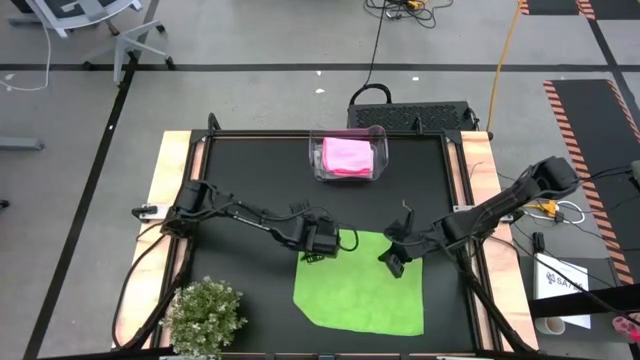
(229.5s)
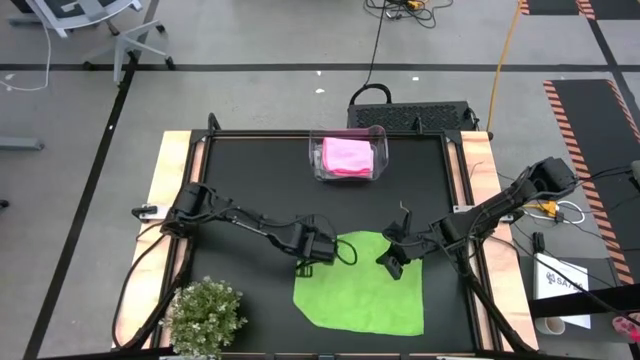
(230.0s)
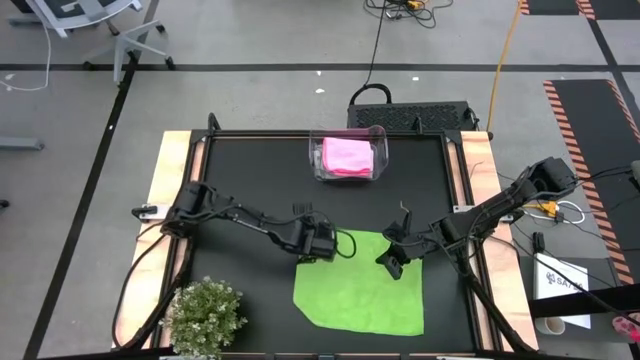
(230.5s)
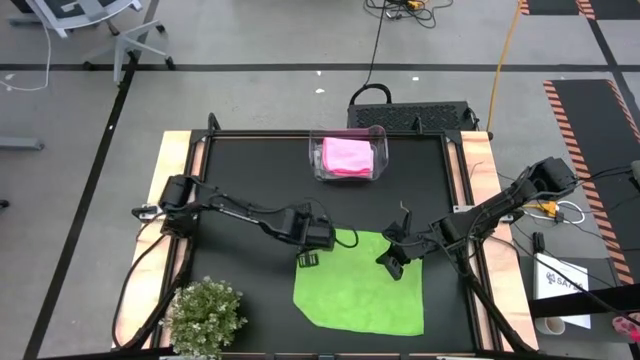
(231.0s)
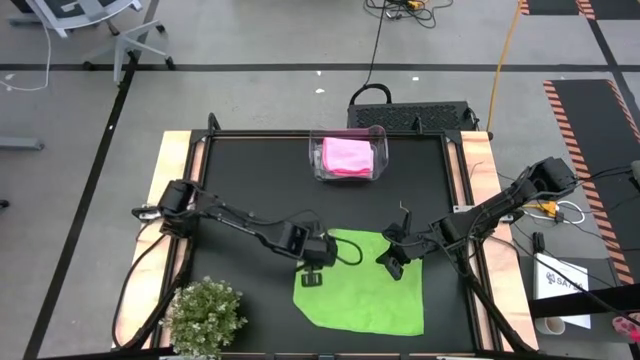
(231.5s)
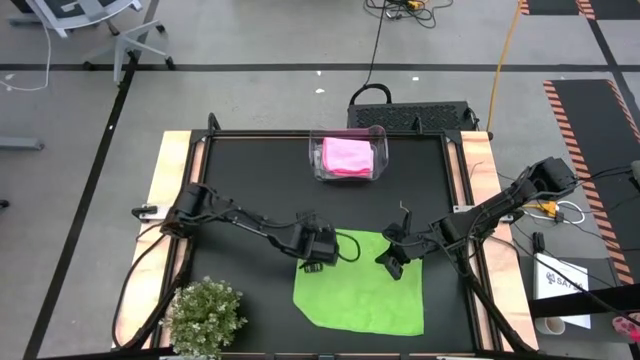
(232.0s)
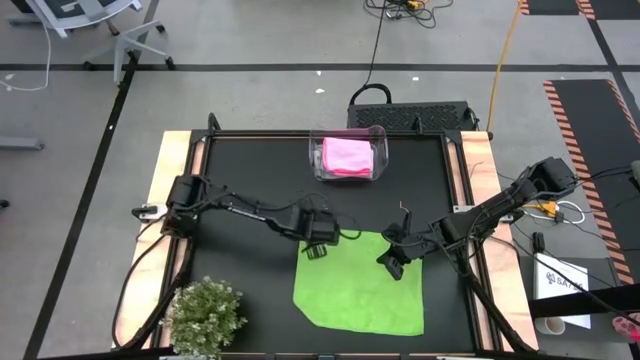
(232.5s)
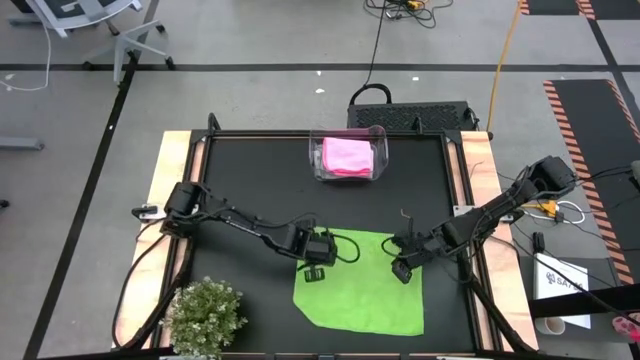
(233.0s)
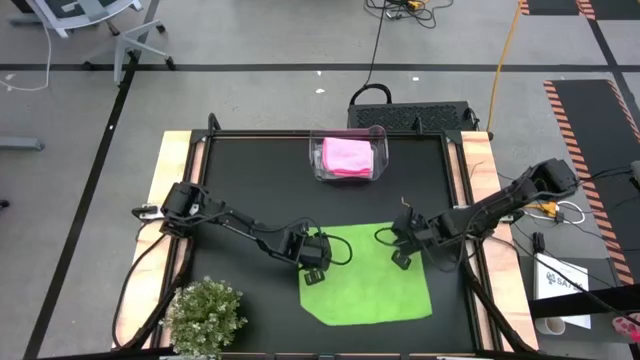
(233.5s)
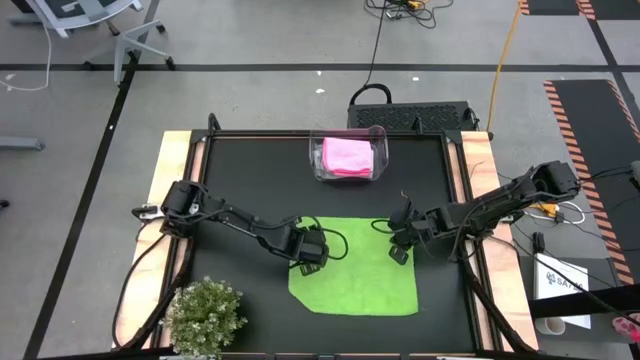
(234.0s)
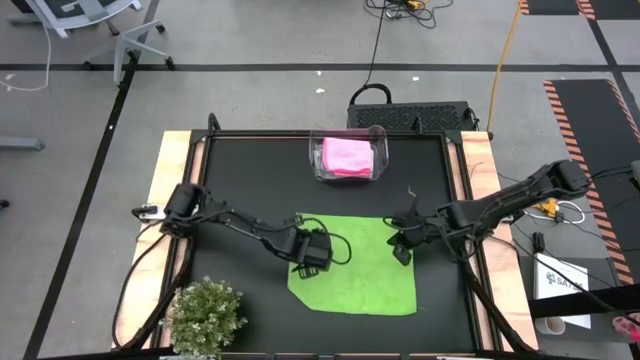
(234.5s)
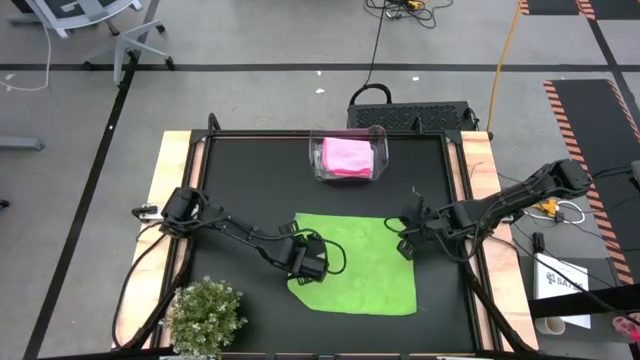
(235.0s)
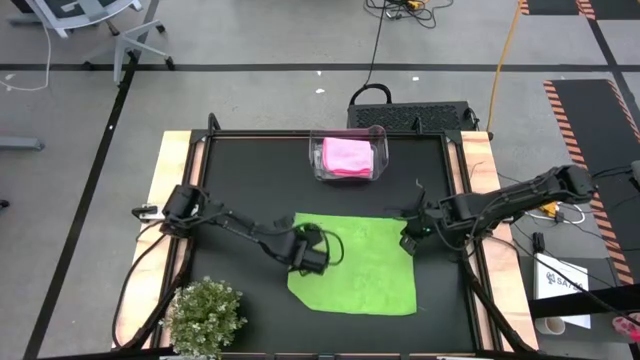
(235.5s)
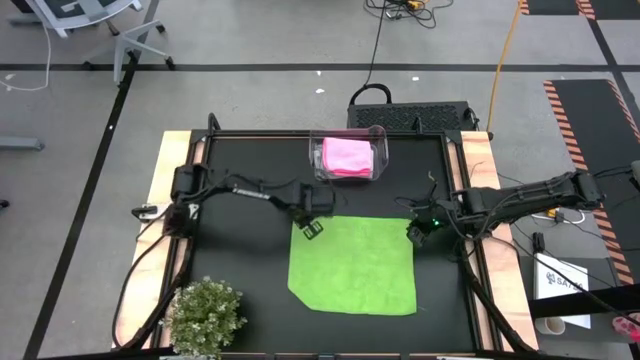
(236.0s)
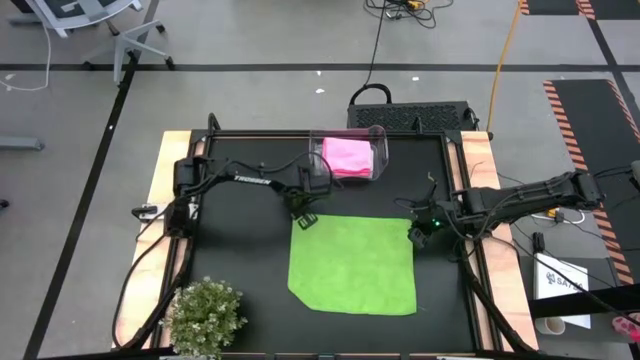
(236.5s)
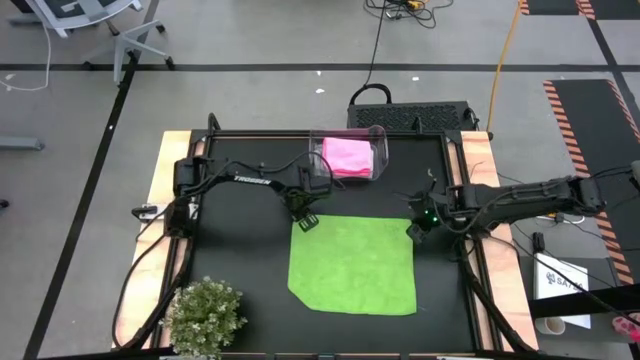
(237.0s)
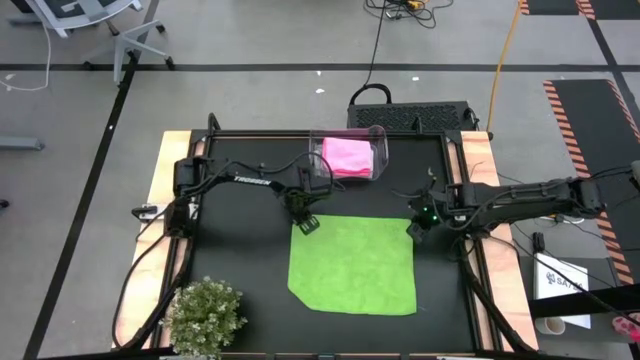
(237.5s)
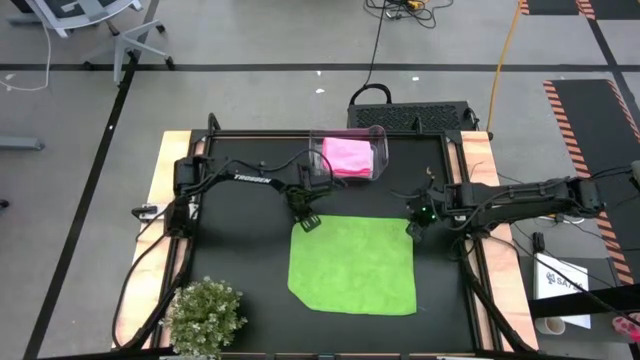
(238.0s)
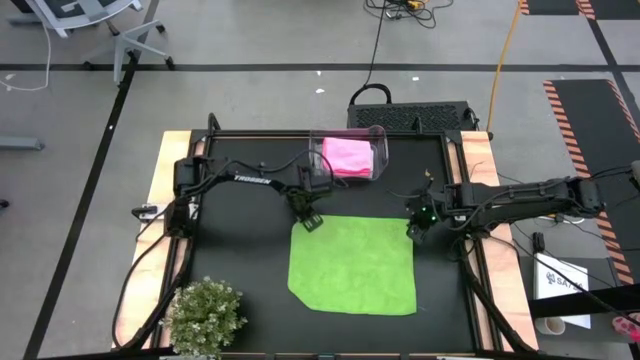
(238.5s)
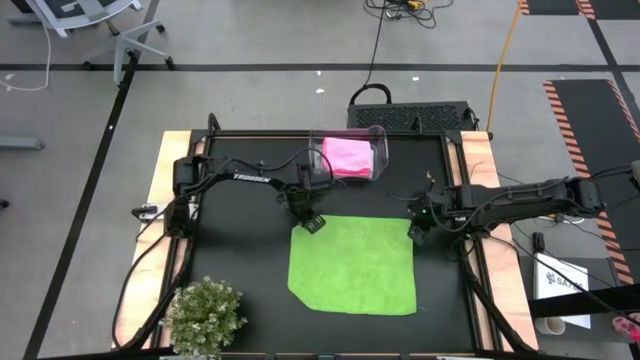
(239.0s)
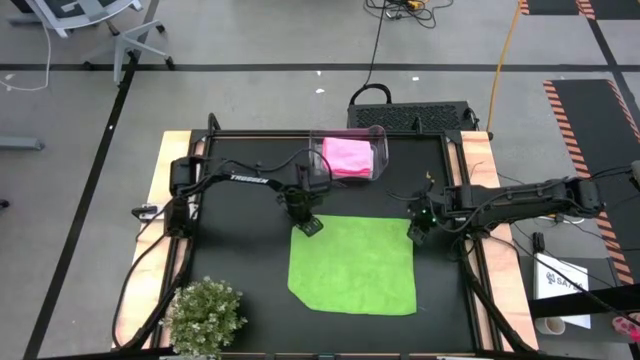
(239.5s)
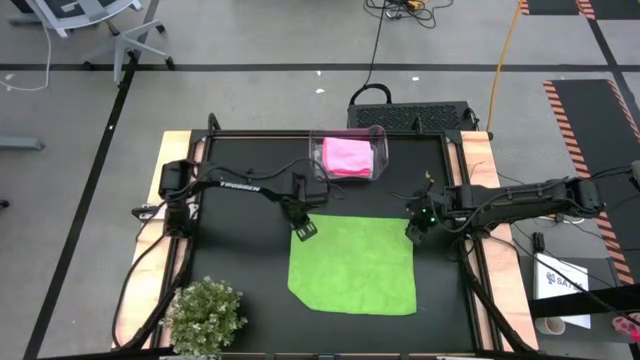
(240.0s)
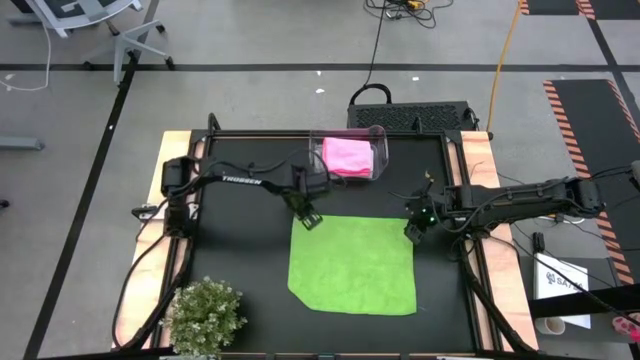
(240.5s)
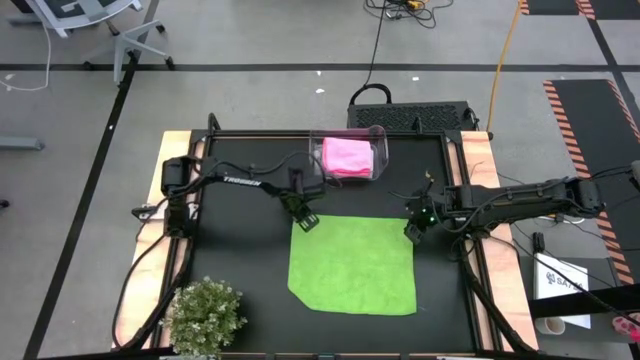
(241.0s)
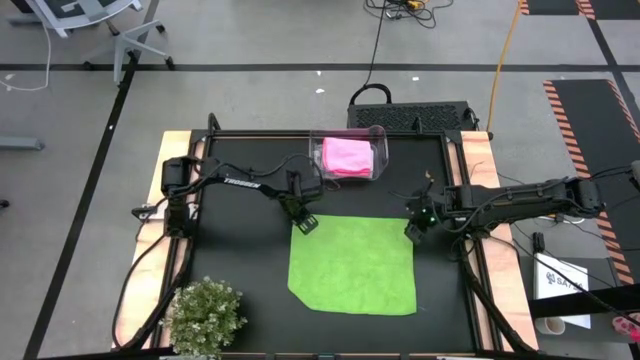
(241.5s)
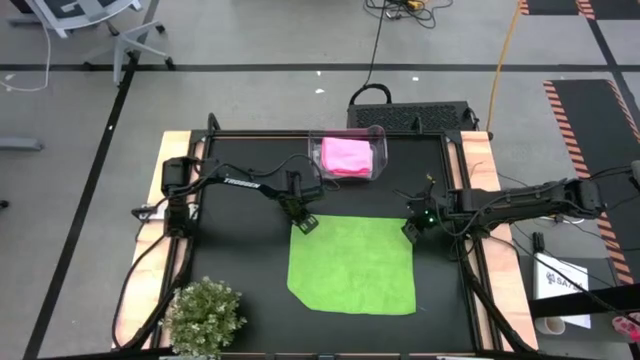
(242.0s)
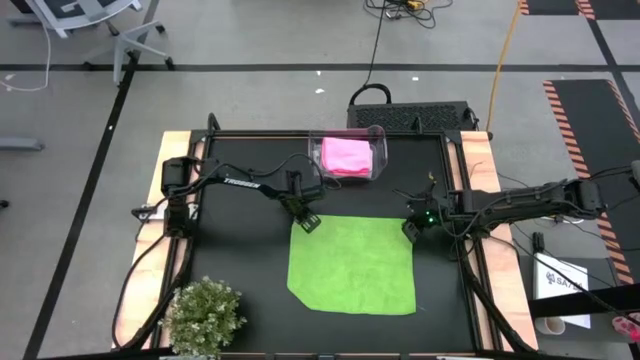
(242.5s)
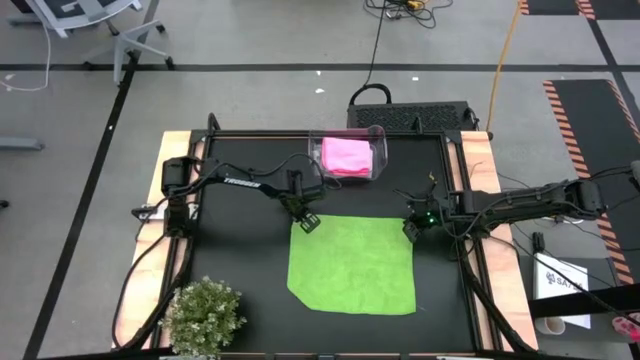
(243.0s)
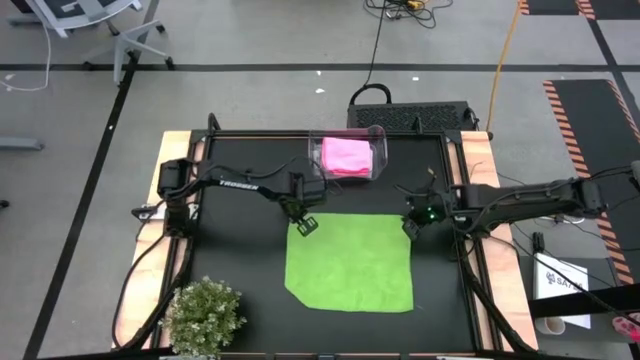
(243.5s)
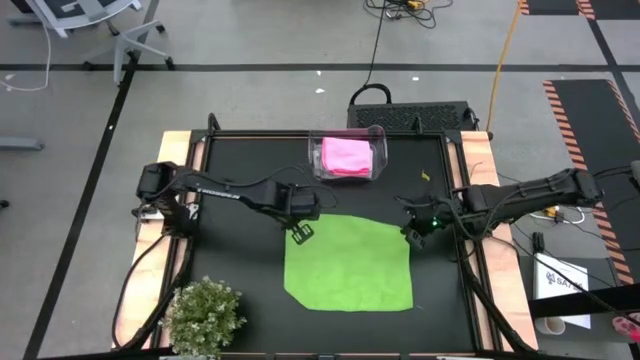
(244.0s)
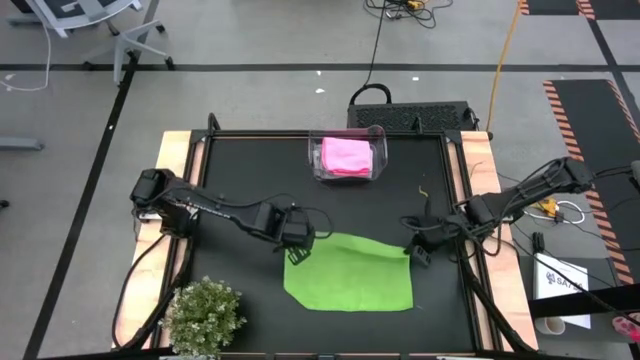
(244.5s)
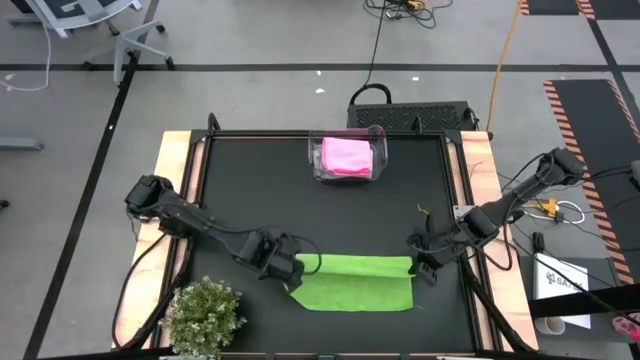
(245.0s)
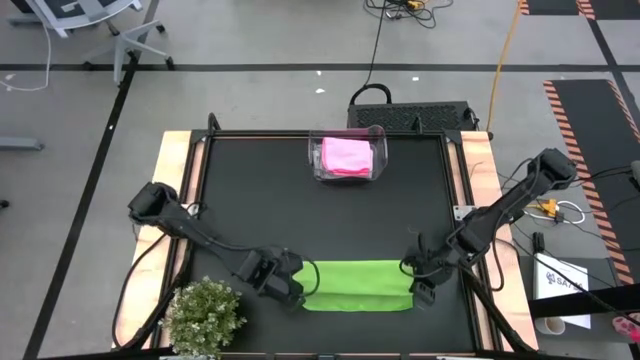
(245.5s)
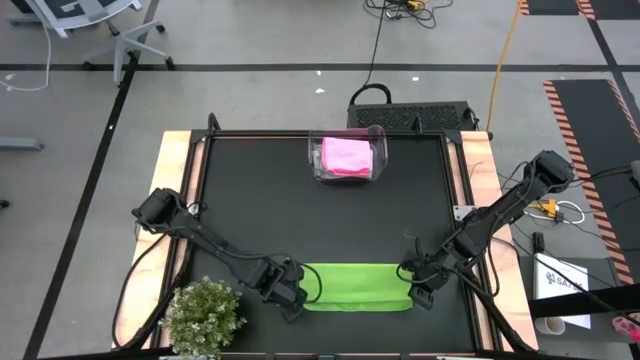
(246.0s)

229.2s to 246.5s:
Task: Fold microfiber towels
Fold the green microfiber cloth

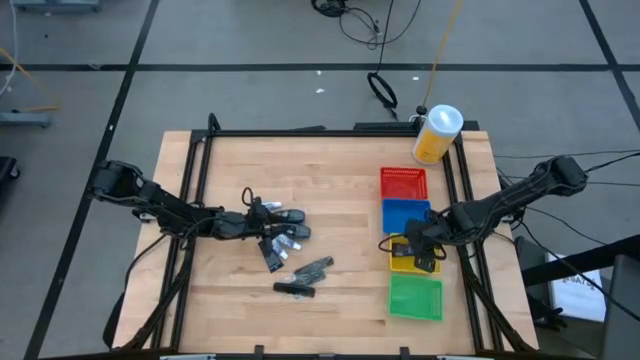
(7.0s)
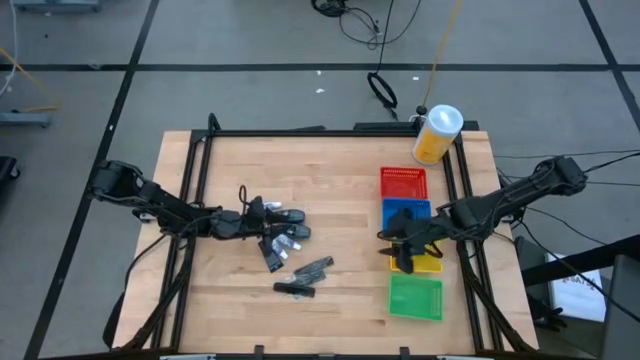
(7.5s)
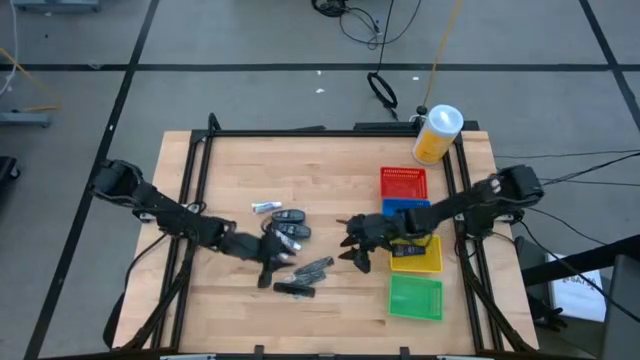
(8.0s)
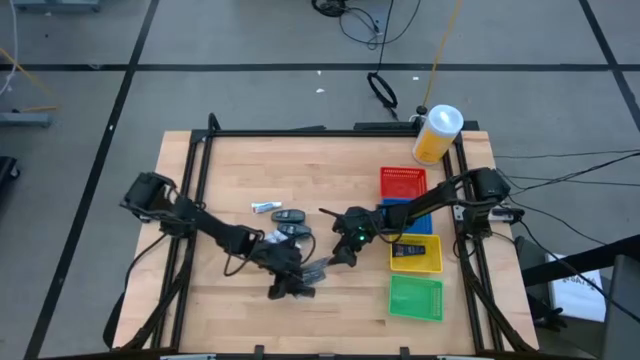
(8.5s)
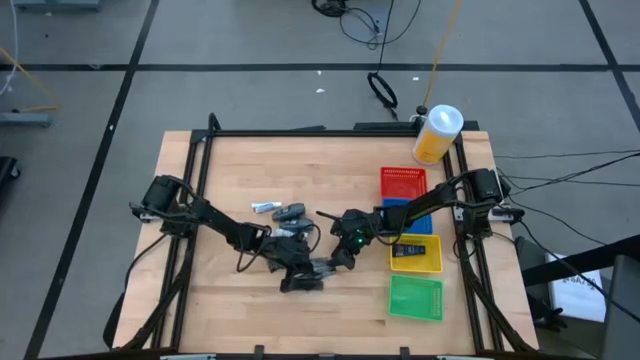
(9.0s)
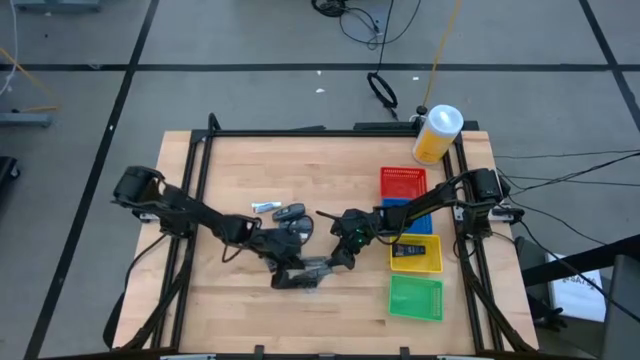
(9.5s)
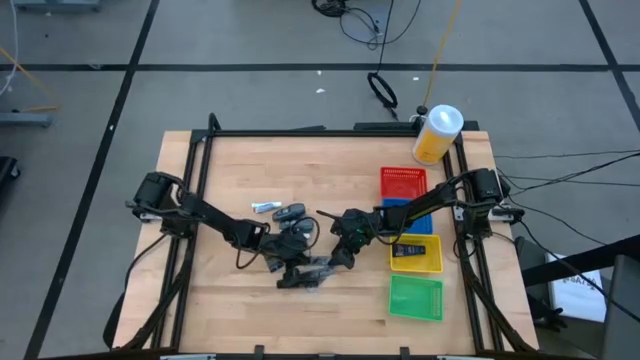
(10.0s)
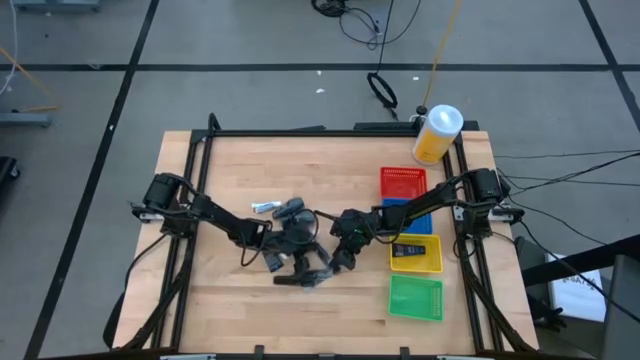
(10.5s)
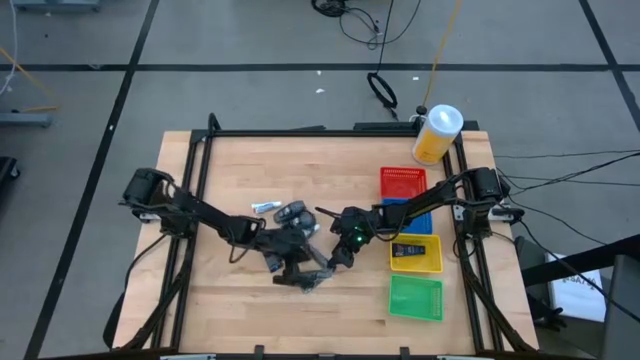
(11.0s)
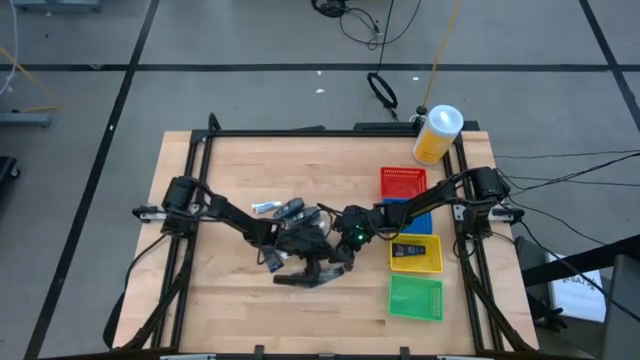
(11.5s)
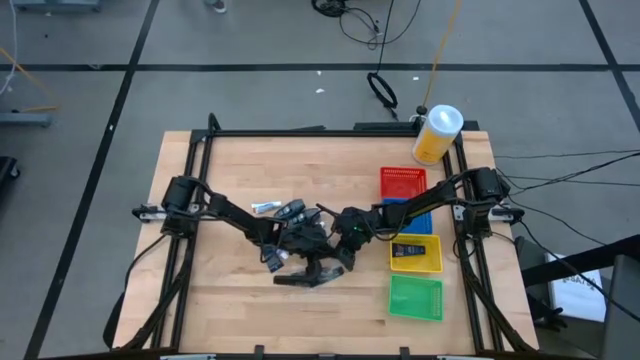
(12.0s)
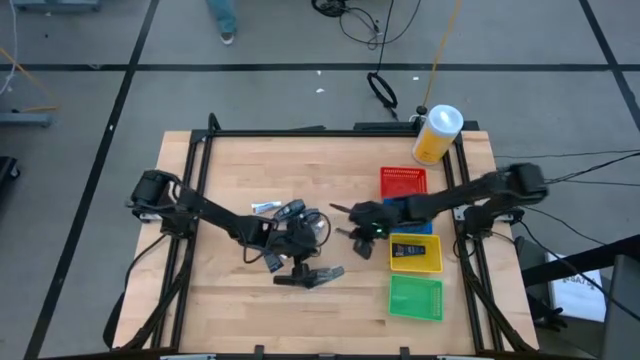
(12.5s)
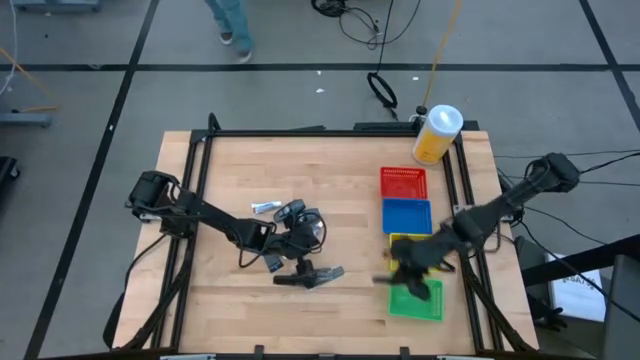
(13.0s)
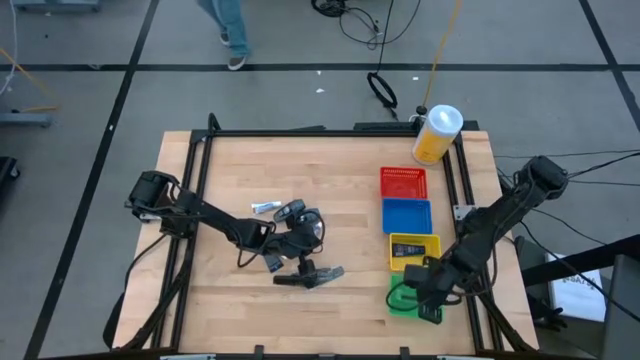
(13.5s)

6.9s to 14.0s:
Task: Pick & Place Travel size toiletries
Put the black comb into the green bin
